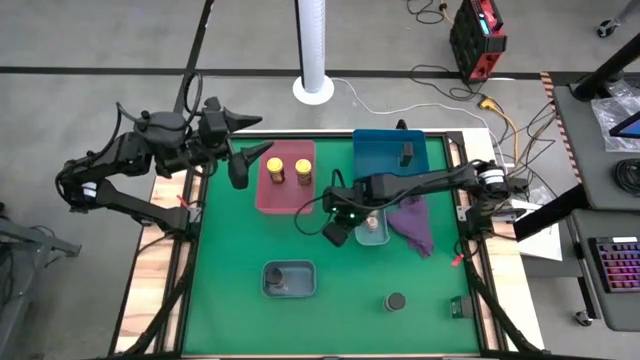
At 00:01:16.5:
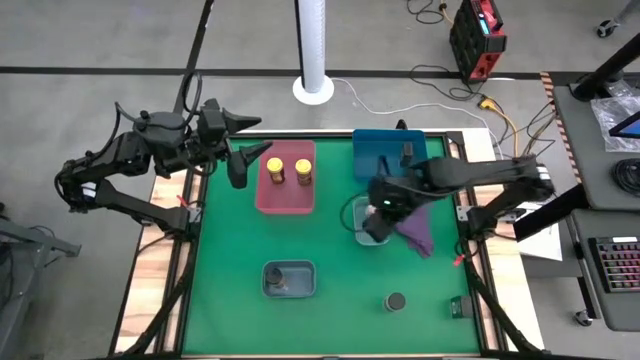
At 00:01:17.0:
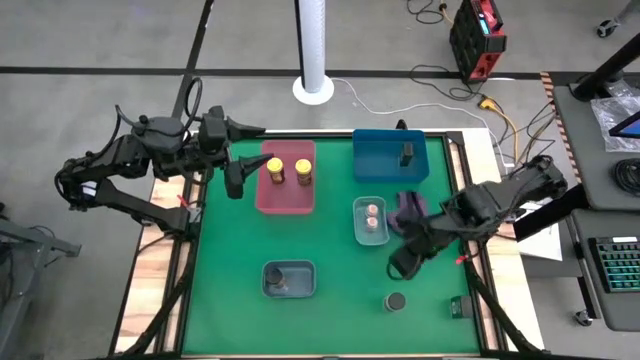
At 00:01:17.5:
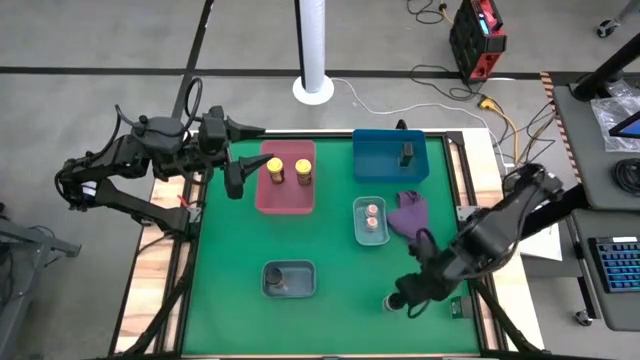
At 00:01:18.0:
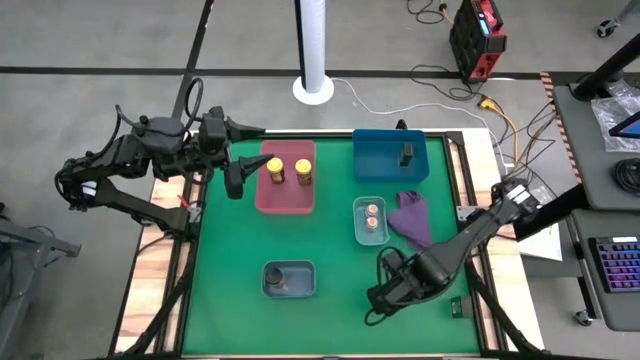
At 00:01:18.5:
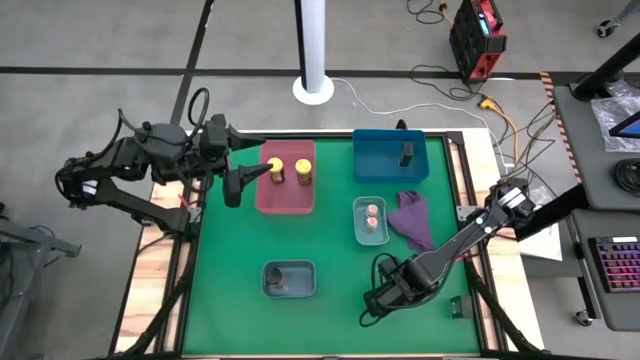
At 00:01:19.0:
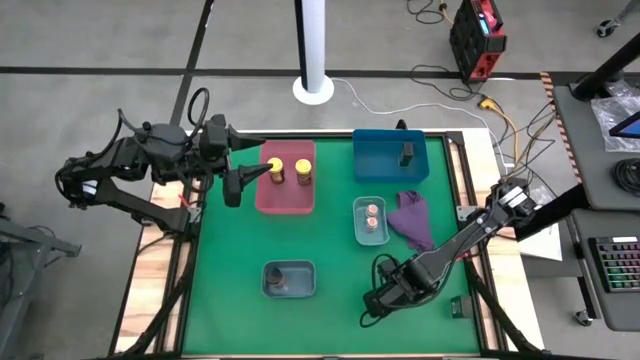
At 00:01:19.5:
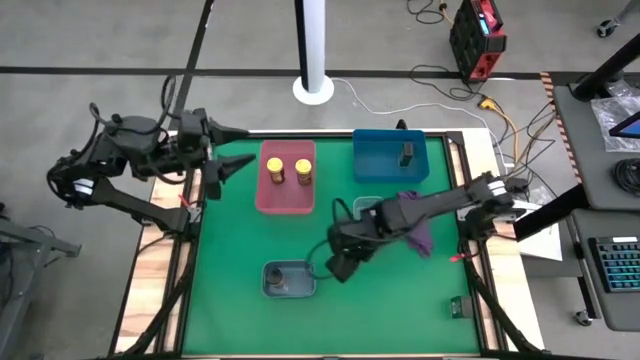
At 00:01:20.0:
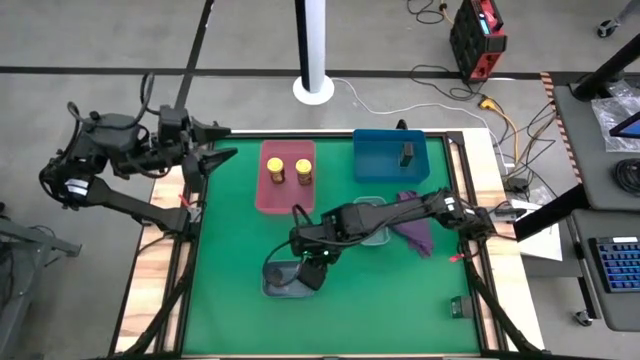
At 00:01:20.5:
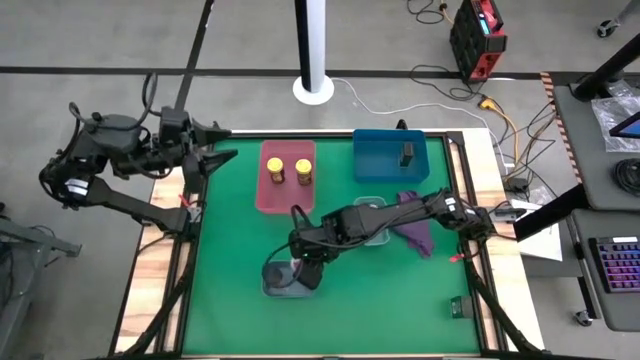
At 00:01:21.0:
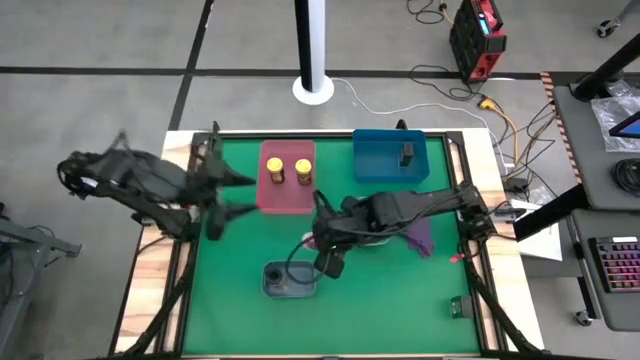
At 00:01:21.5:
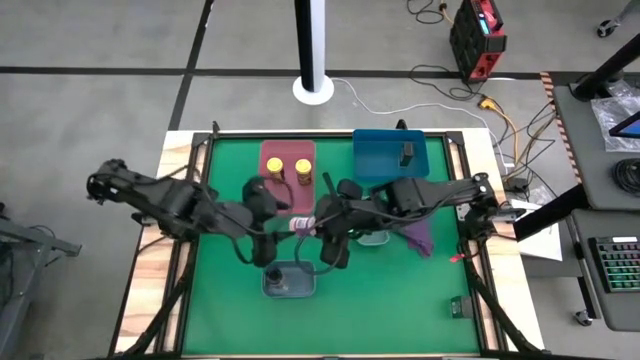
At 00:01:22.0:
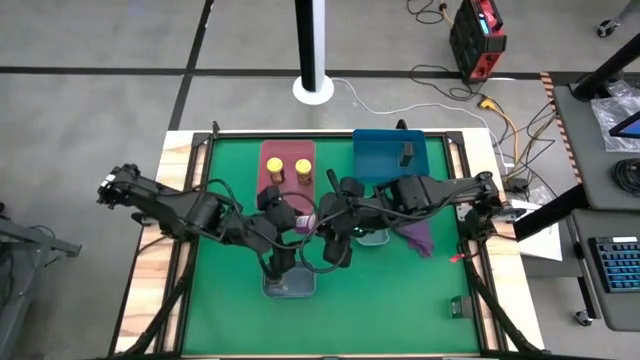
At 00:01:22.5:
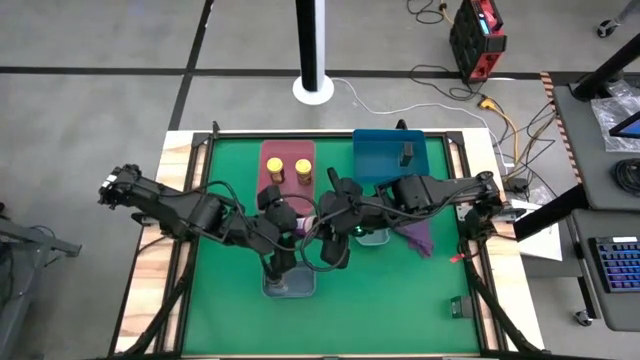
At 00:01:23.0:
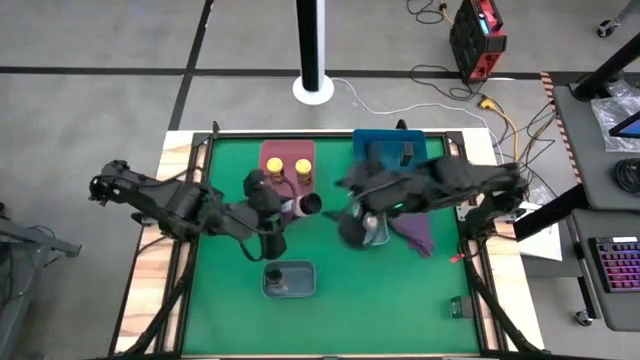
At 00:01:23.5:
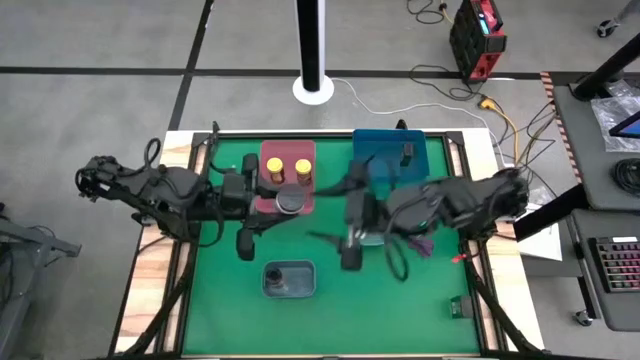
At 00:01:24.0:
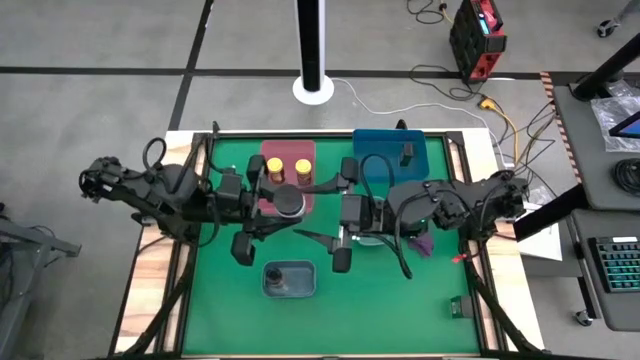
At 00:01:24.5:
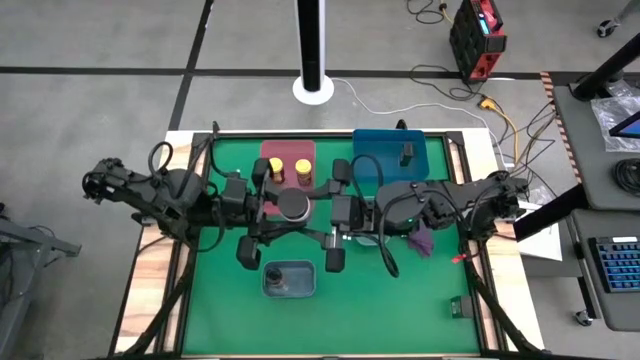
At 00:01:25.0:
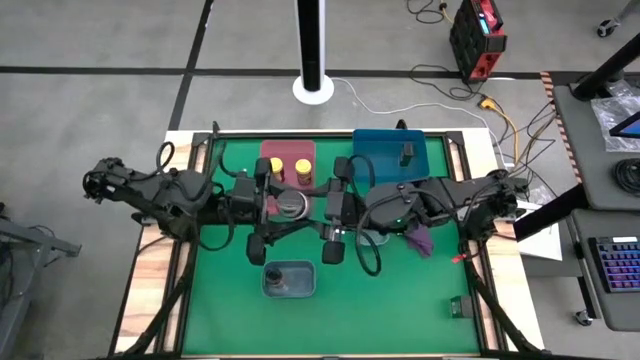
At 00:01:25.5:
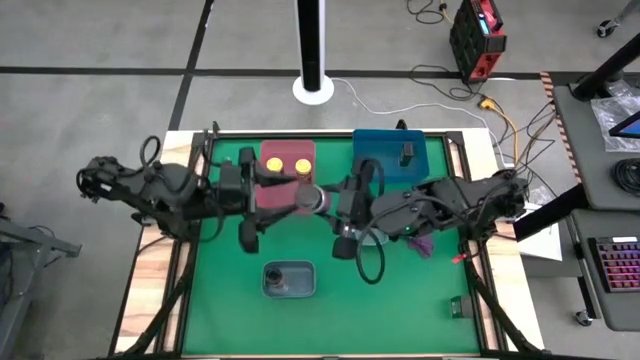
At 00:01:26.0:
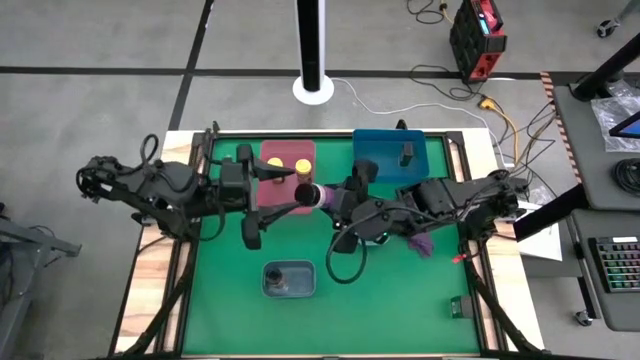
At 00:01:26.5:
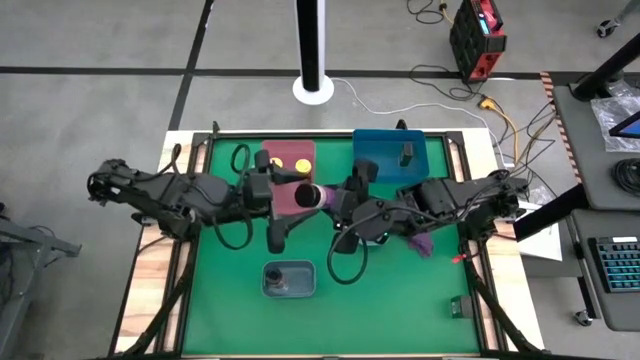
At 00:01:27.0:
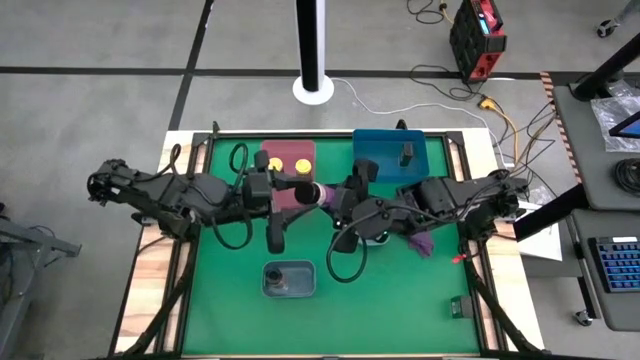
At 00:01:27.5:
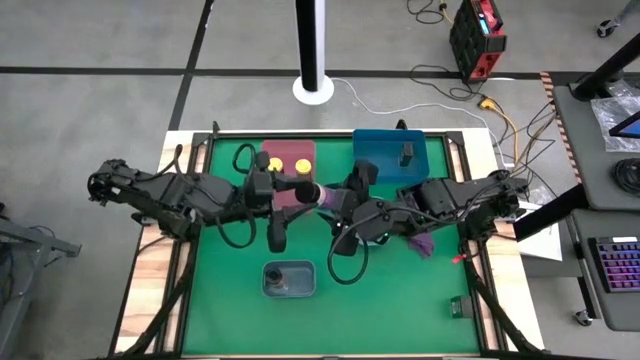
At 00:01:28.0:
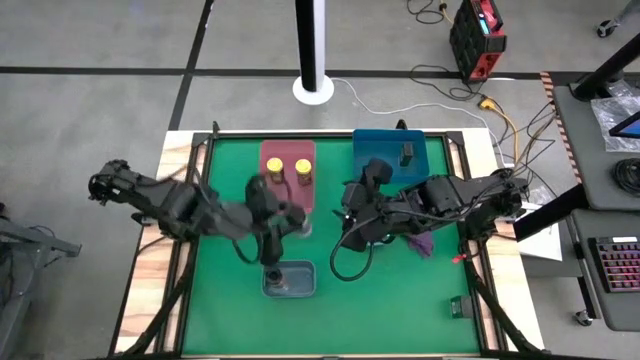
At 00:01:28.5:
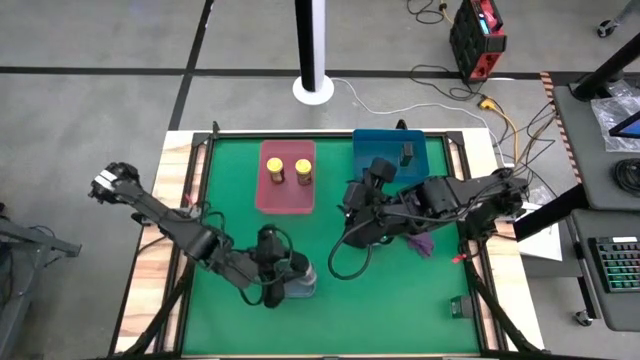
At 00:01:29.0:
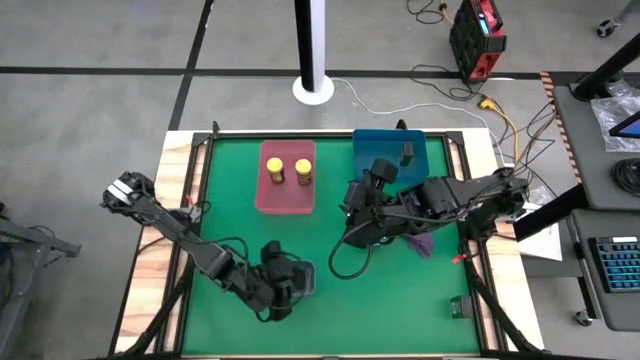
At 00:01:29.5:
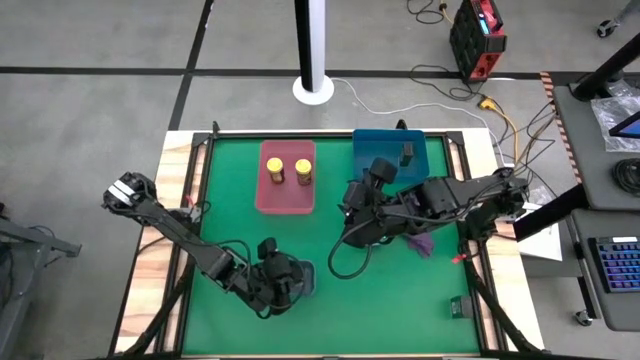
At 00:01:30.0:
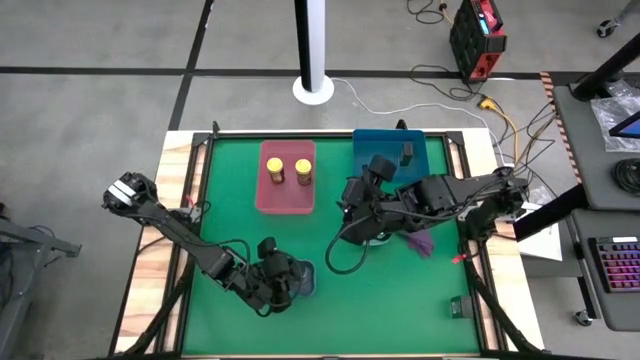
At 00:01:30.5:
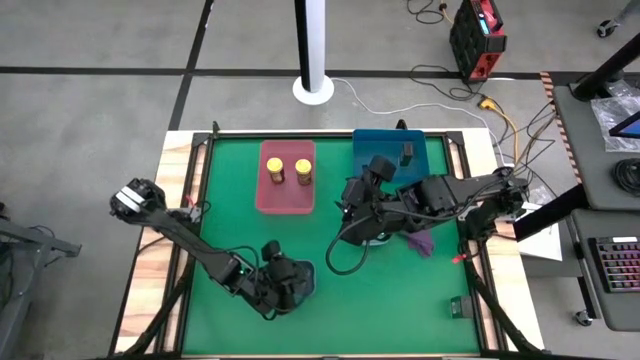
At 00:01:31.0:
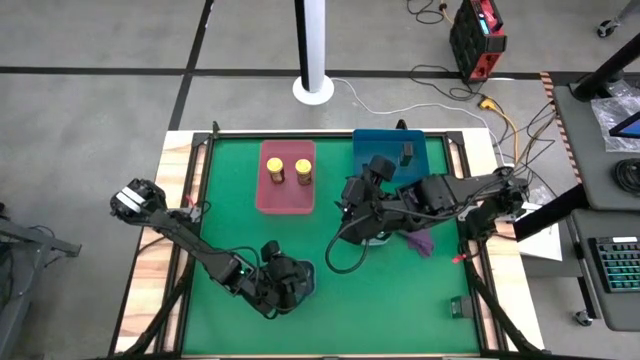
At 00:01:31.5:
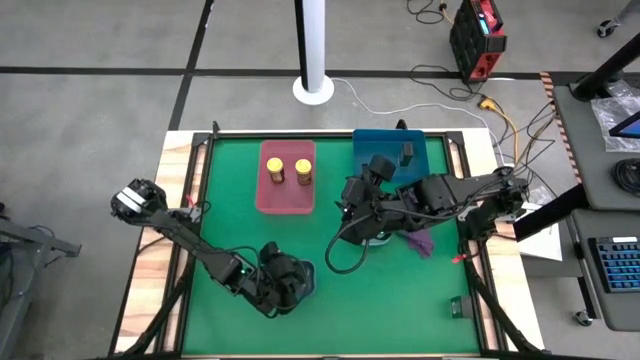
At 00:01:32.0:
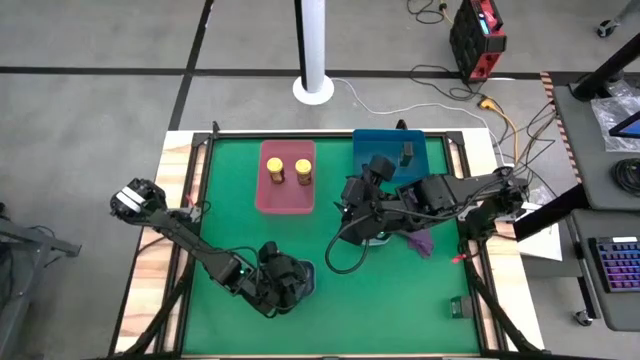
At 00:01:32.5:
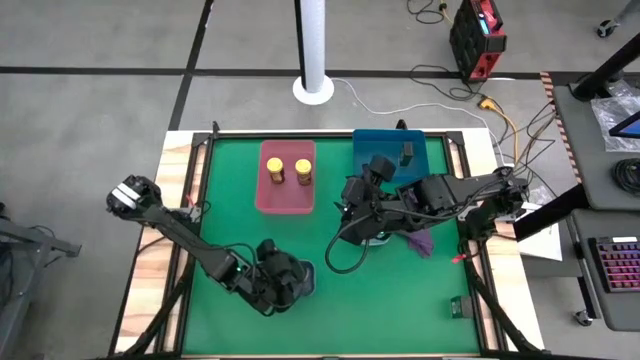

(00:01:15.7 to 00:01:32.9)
Task: Sort spices by type
Put the black seasoning bottle into the small blue bin

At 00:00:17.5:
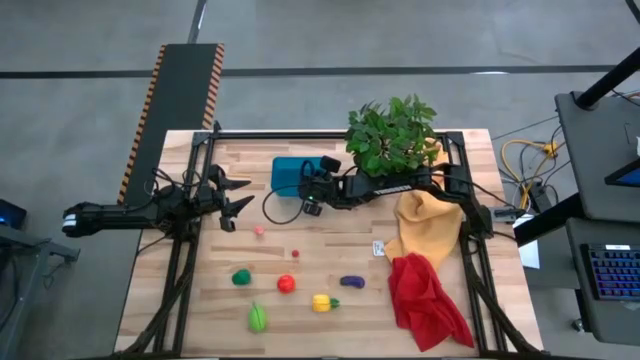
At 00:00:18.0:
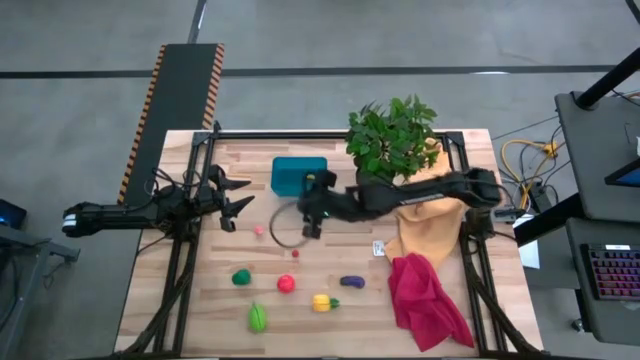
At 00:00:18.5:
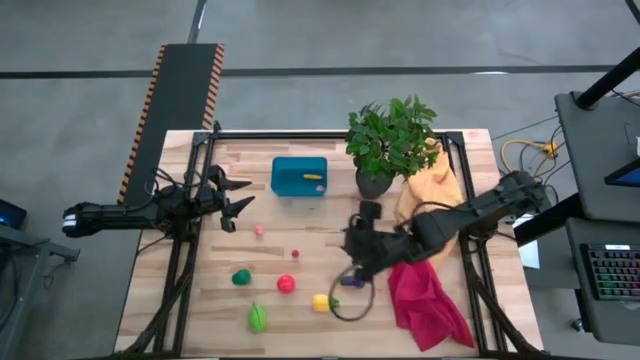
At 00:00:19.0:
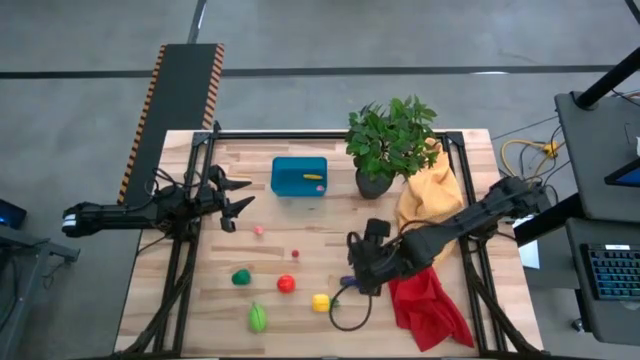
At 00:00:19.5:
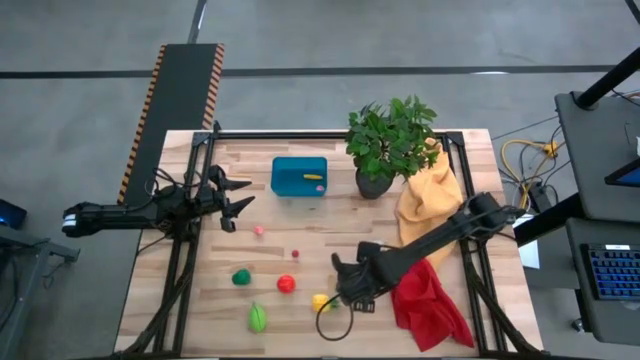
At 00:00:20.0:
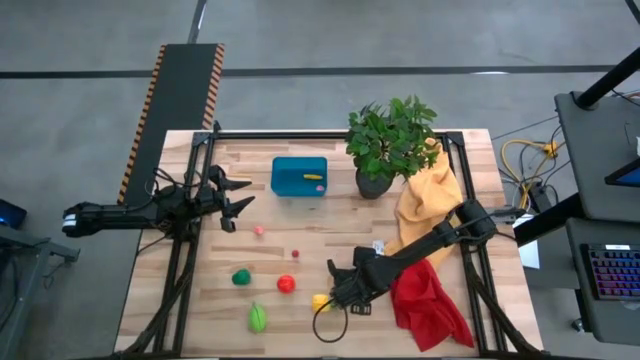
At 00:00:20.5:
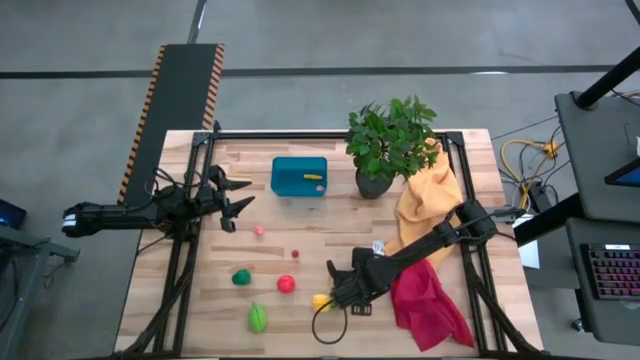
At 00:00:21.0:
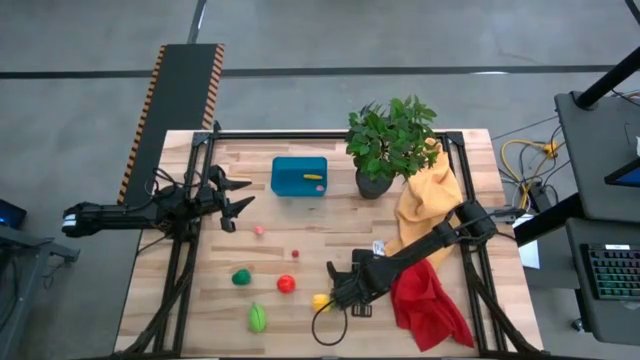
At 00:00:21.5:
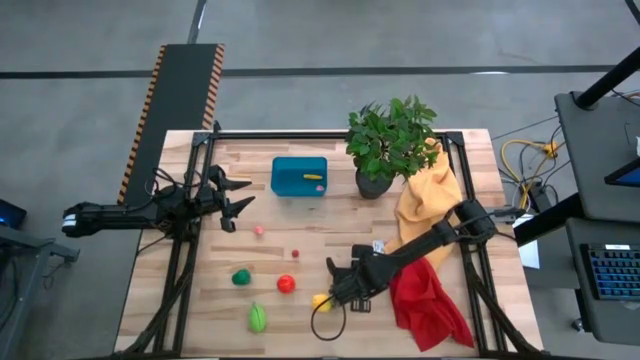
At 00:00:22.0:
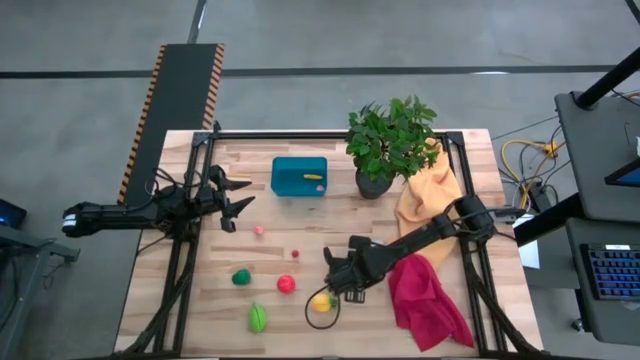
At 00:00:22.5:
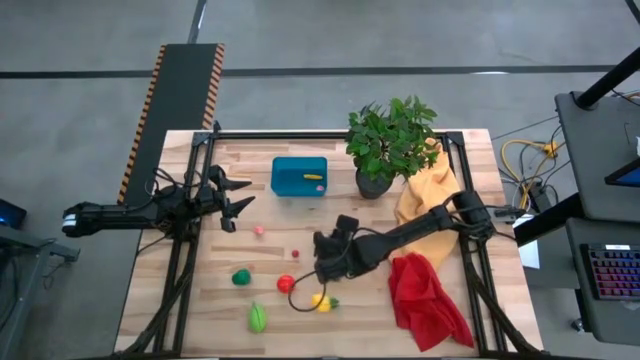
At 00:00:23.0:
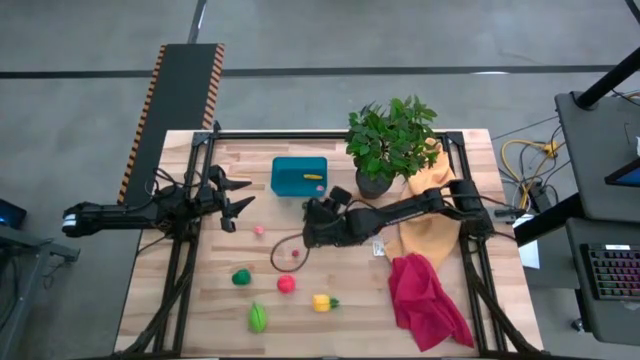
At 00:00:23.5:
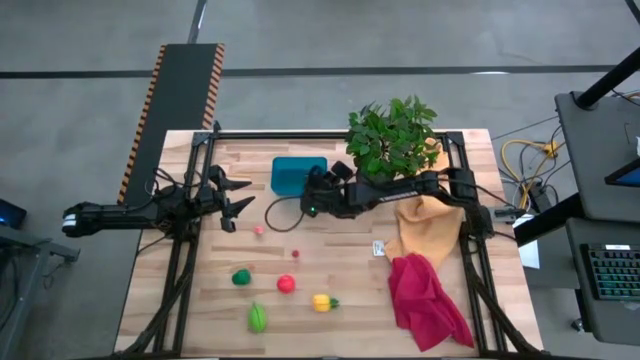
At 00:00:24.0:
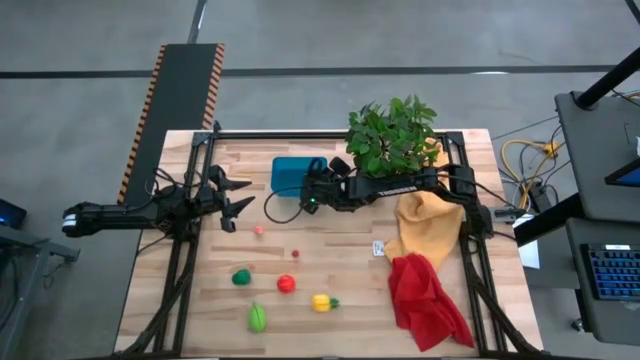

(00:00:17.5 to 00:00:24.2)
Task: Pick and placing Produce into tupperware
Put the eggplant into the bin
